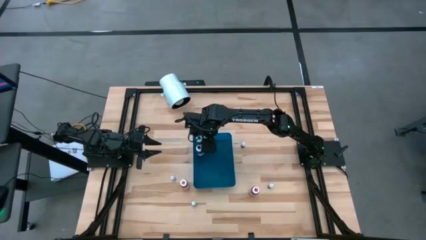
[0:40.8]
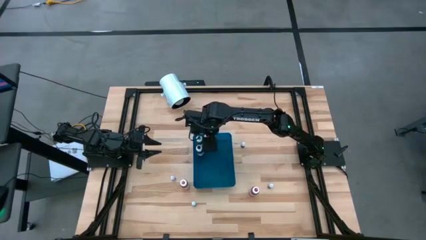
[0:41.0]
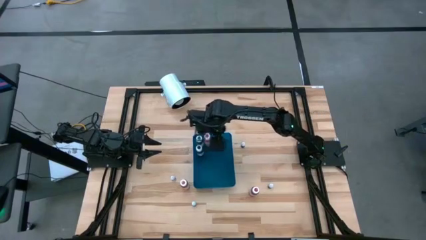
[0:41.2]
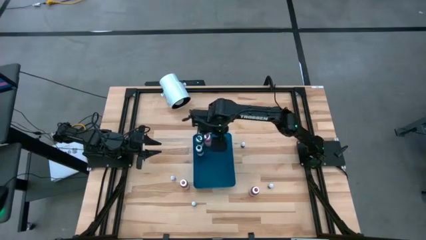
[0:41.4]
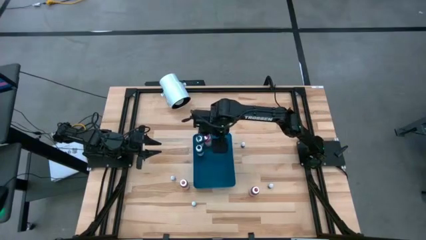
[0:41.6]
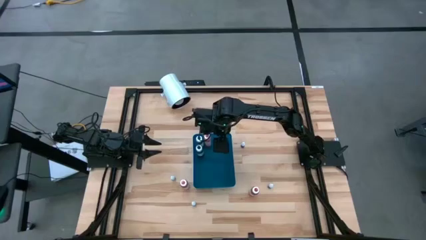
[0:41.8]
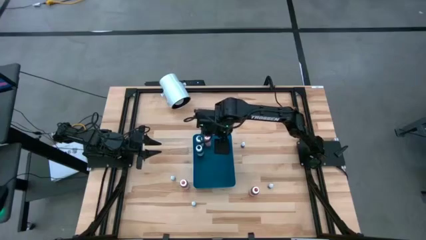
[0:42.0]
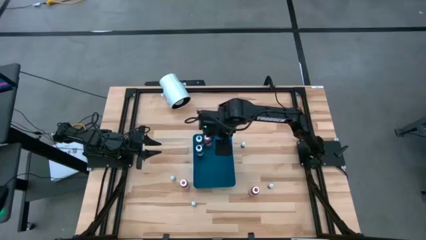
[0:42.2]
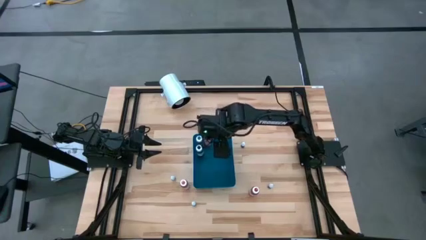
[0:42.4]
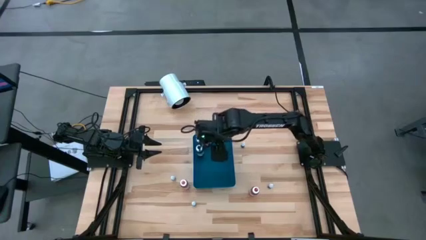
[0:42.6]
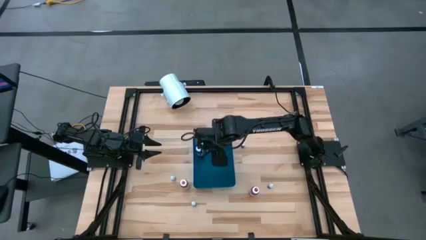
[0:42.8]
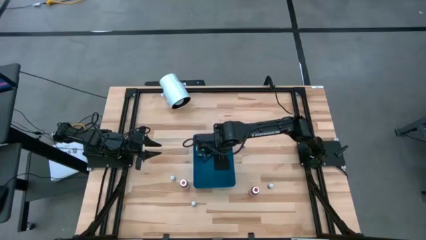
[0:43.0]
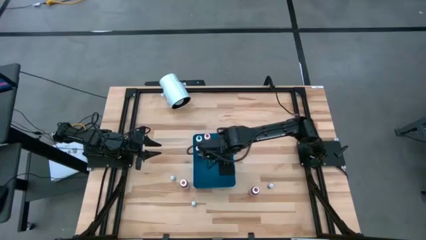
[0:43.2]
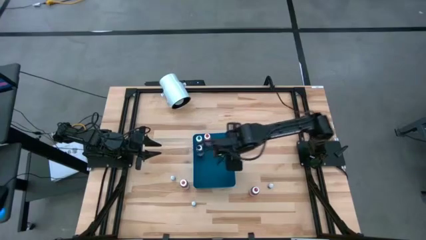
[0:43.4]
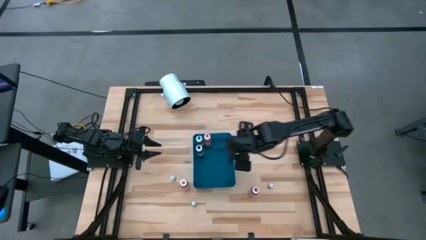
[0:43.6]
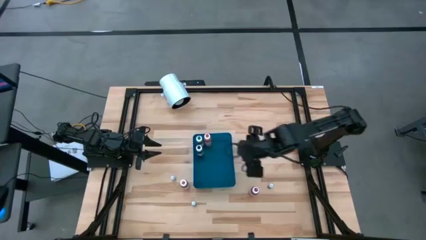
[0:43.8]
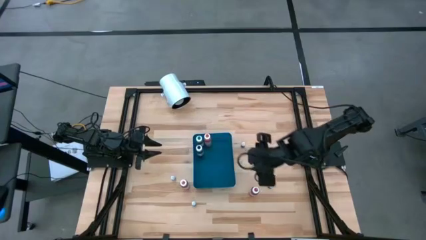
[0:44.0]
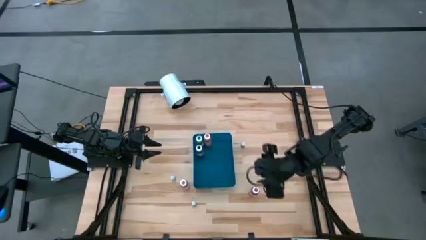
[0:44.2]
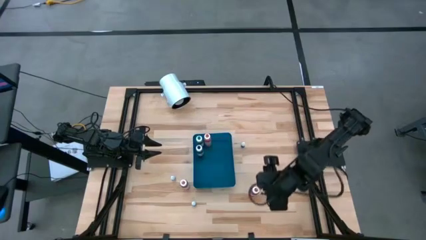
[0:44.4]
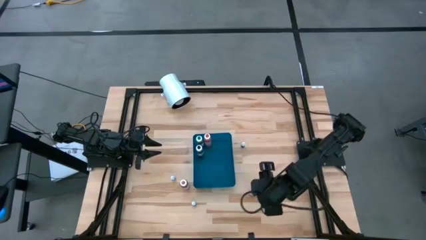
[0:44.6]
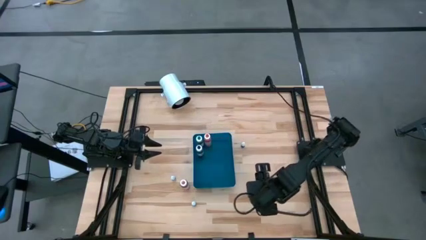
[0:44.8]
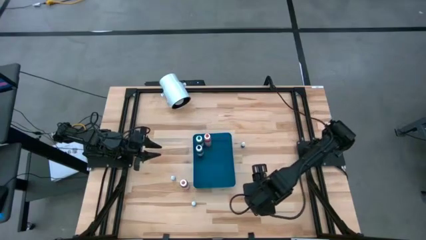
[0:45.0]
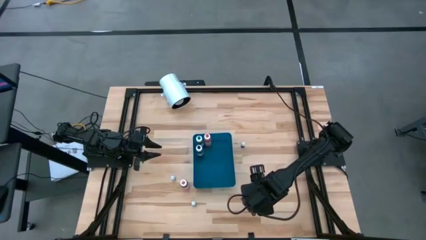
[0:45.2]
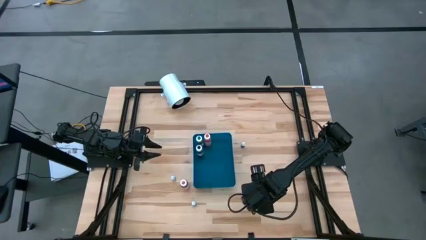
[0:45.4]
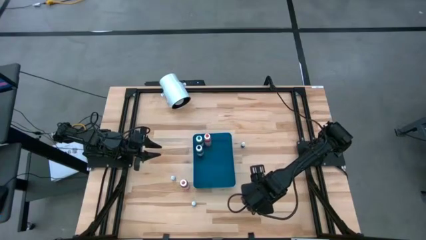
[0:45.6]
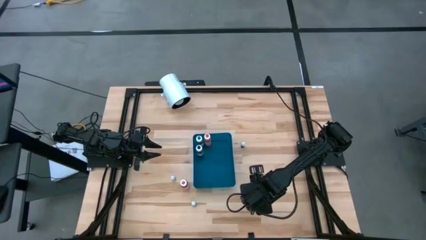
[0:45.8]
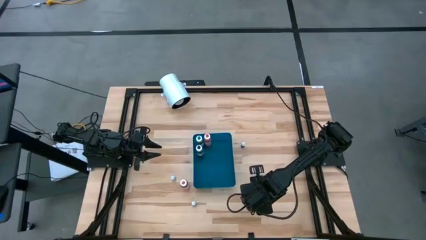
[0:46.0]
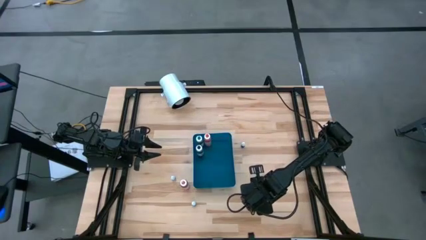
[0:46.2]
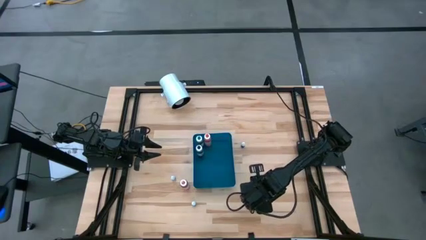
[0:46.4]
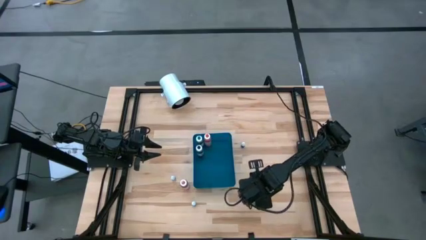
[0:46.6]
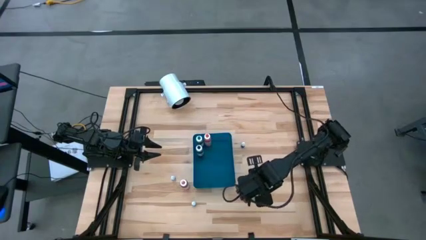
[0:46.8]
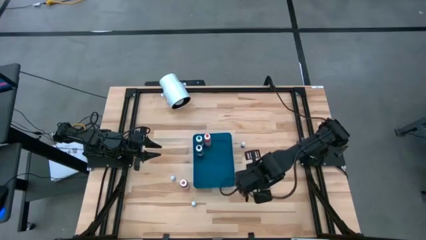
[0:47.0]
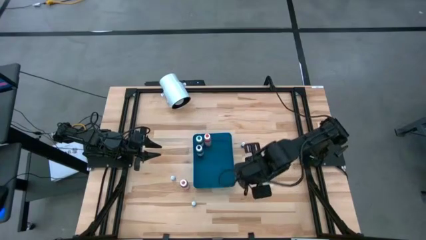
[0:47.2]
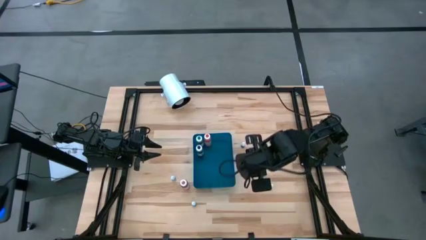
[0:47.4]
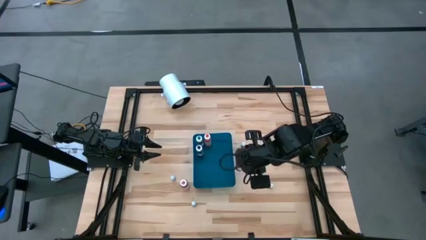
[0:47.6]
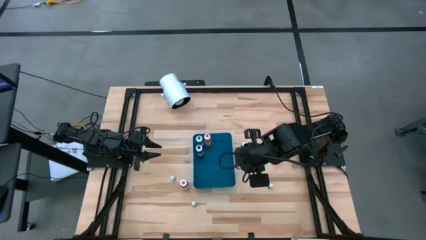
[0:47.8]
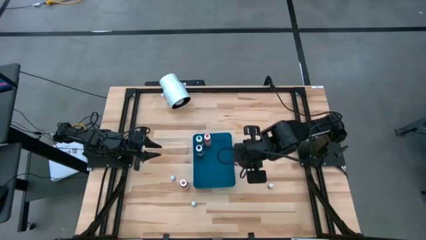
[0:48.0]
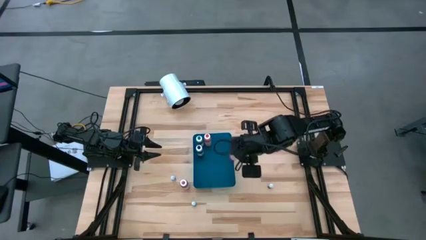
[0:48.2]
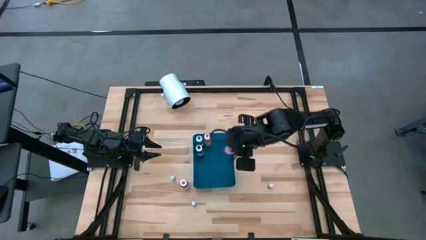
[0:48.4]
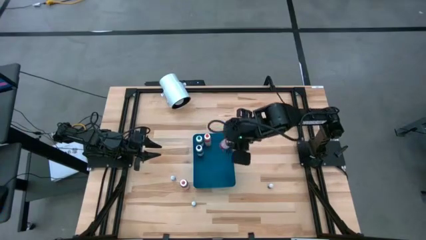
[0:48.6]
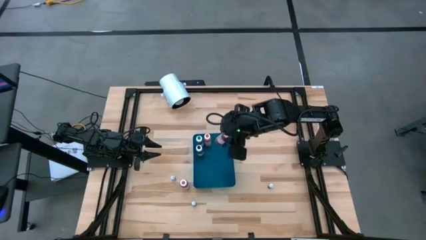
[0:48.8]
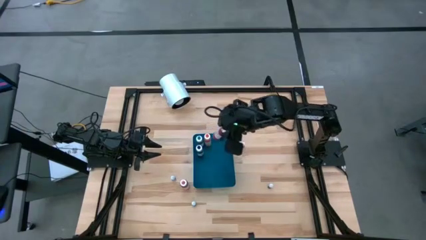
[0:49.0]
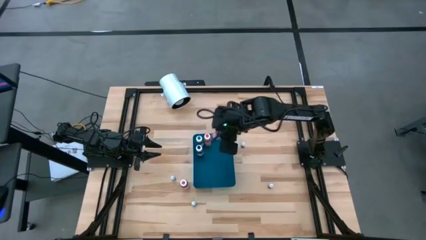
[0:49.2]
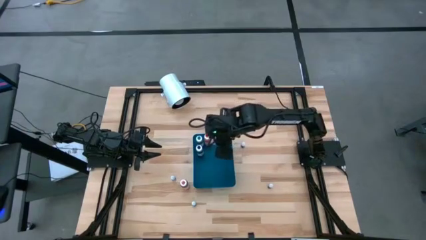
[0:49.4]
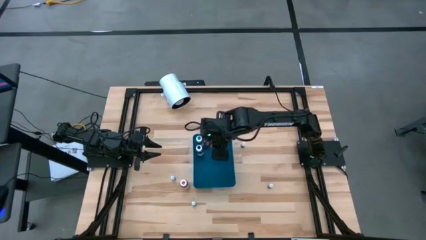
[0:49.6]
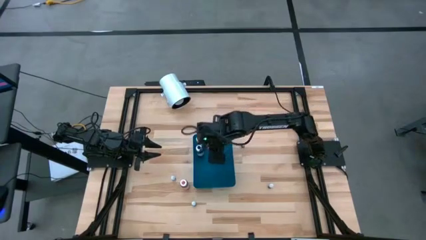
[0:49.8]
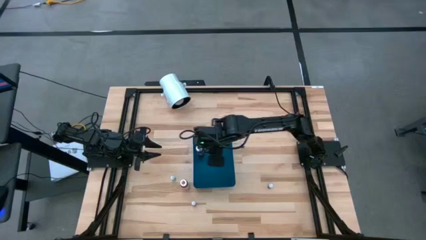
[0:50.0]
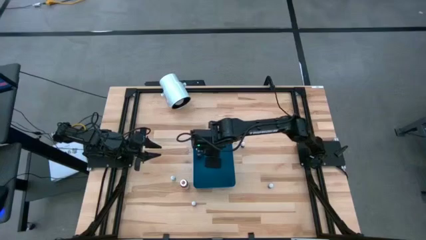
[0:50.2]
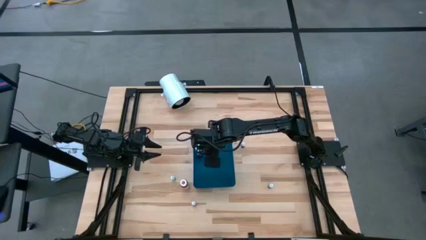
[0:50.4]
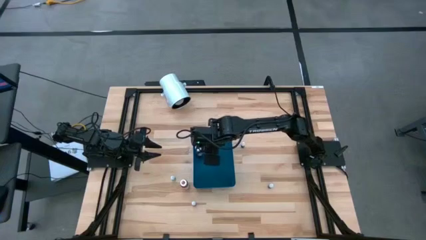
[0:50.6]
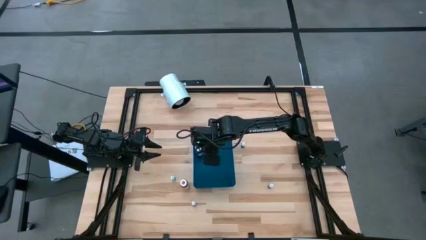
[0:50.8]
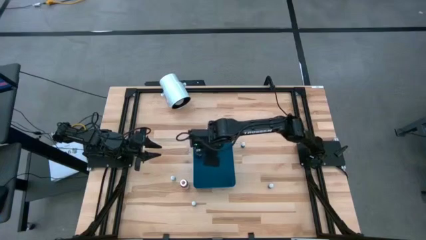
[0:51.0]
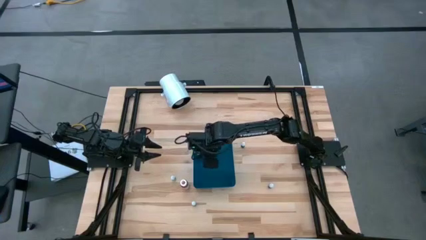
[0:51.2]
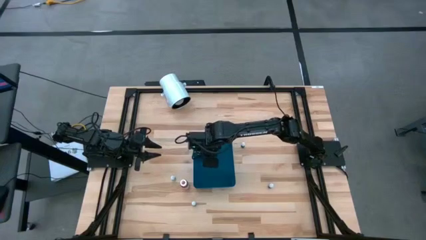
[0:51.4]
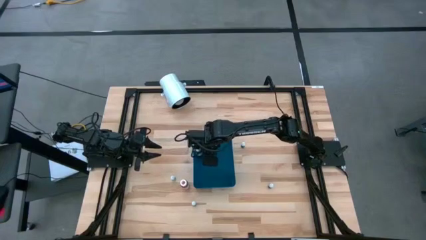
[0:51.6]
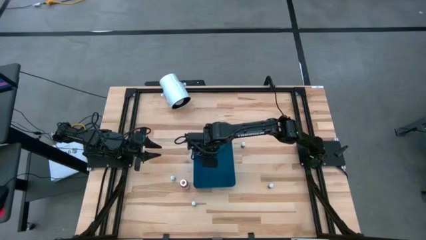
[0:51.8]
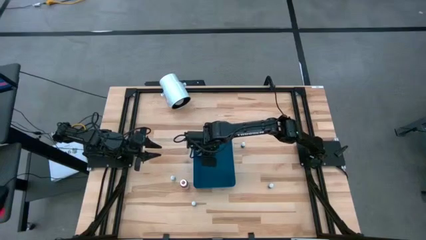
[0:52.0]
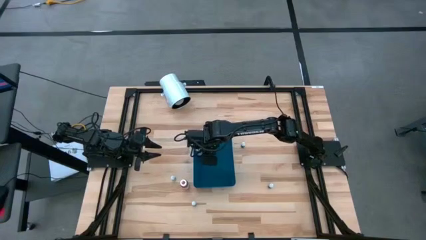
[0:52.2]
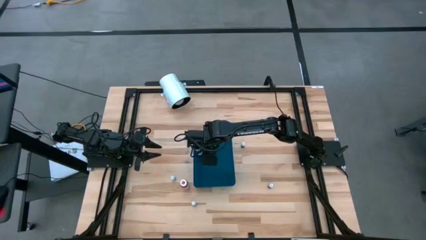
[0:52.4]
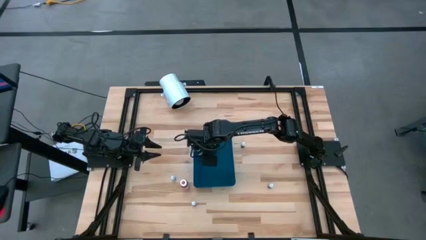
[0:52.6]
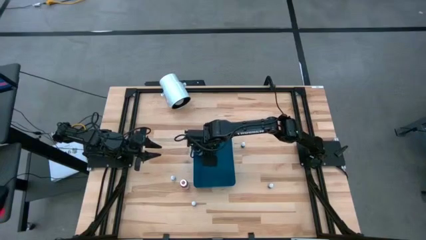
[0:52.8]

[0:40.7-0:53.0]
Task: Pick & Place food coloring
Put the large red food coloring bottle into the blue bin
